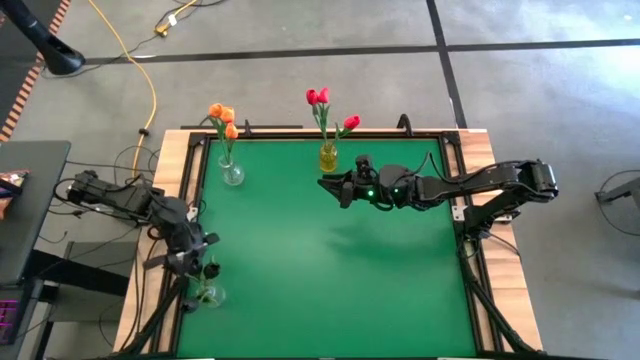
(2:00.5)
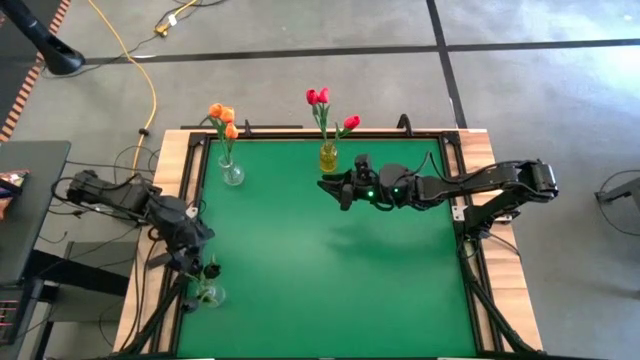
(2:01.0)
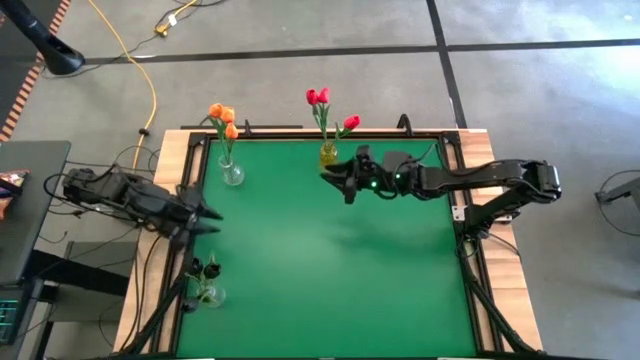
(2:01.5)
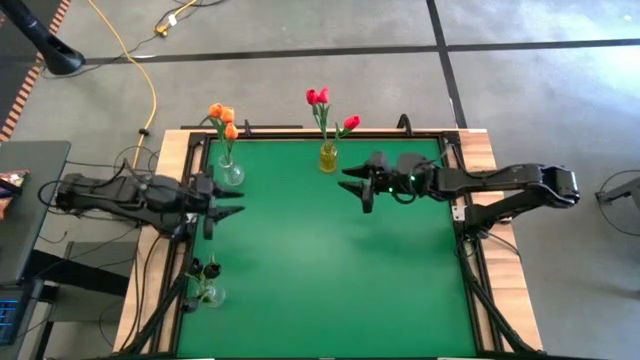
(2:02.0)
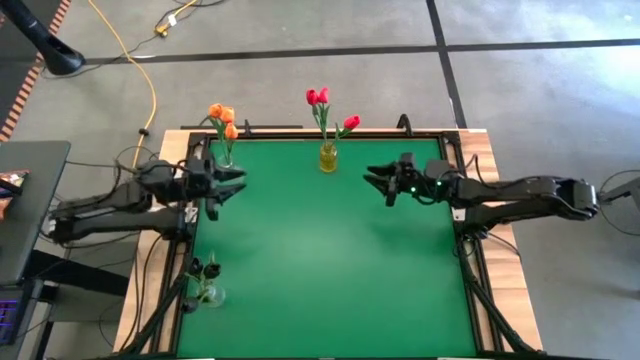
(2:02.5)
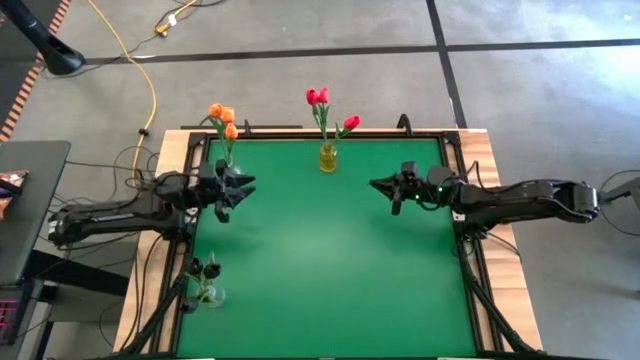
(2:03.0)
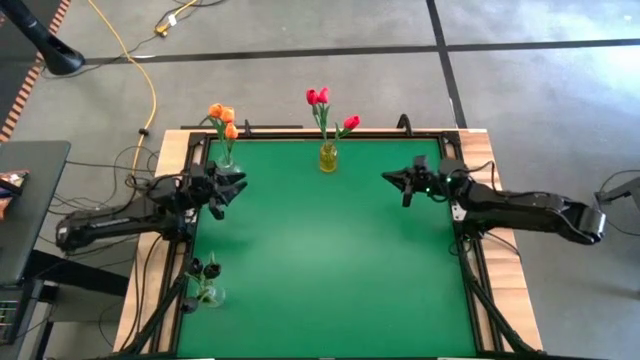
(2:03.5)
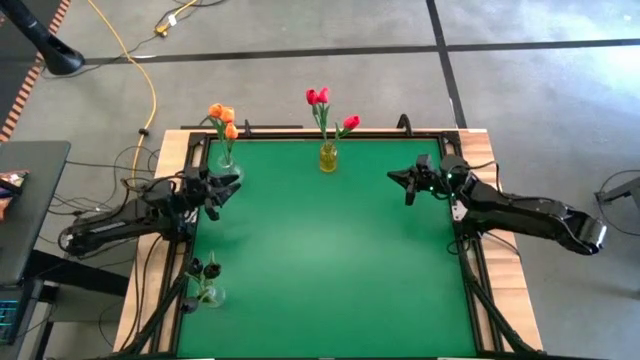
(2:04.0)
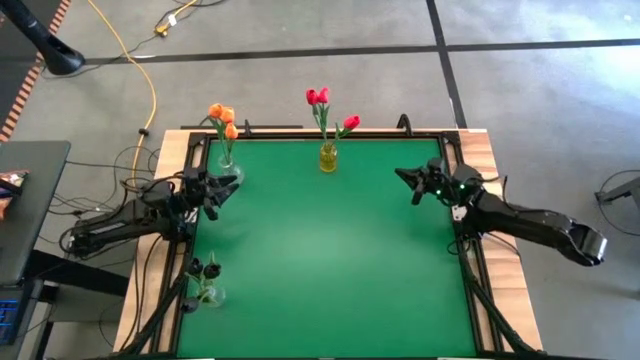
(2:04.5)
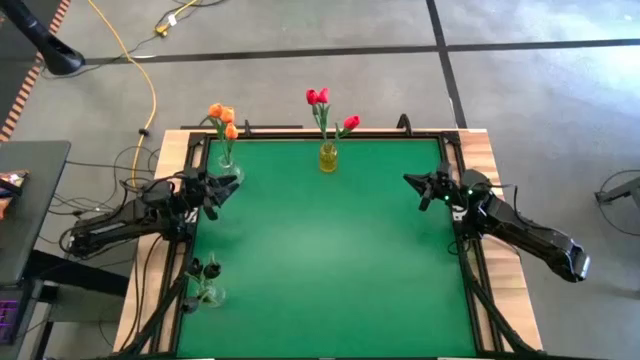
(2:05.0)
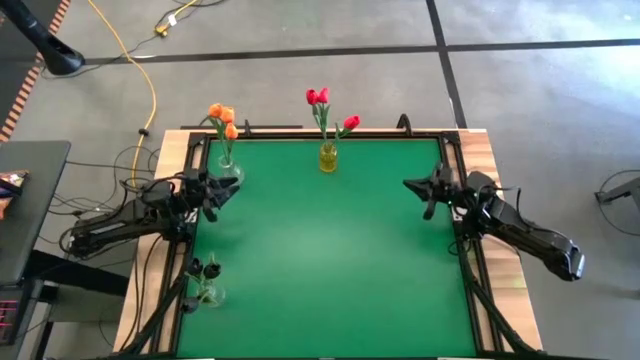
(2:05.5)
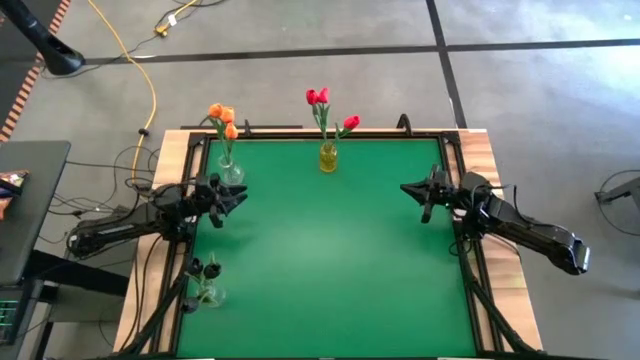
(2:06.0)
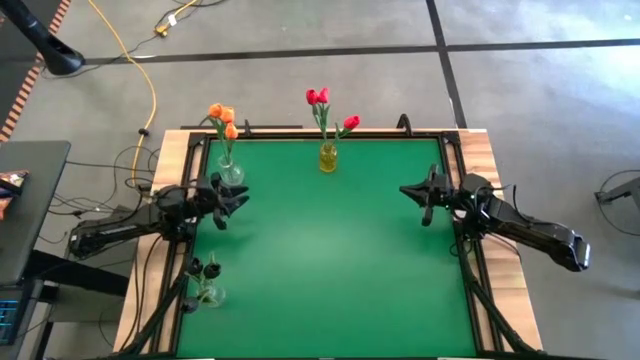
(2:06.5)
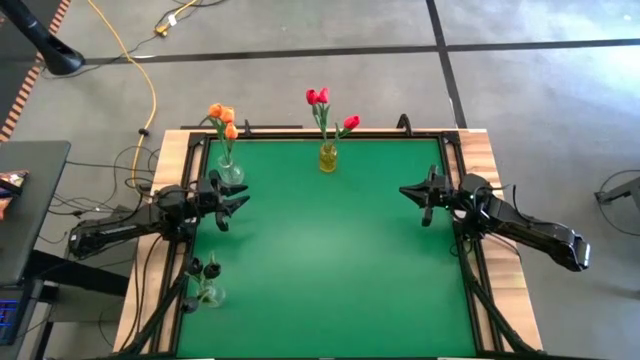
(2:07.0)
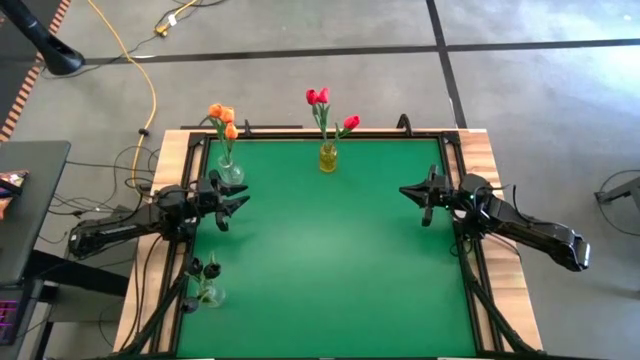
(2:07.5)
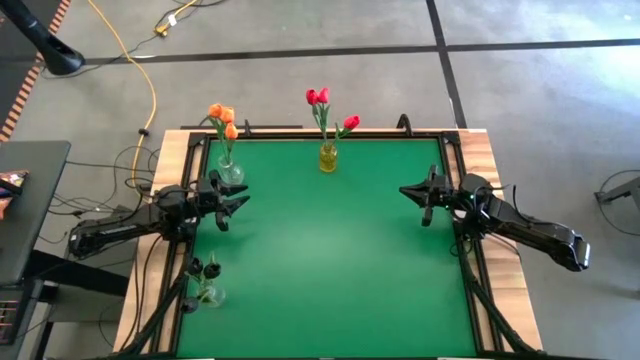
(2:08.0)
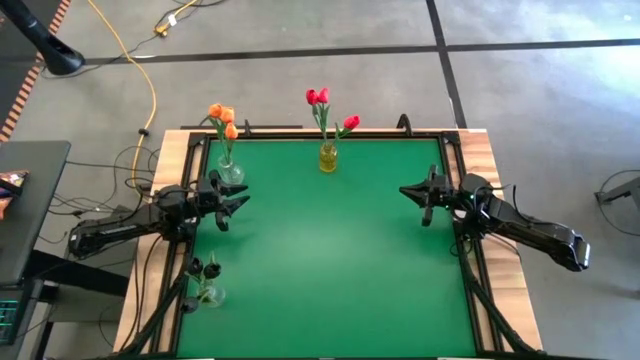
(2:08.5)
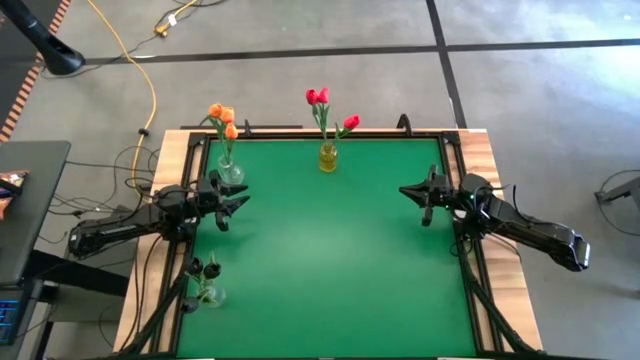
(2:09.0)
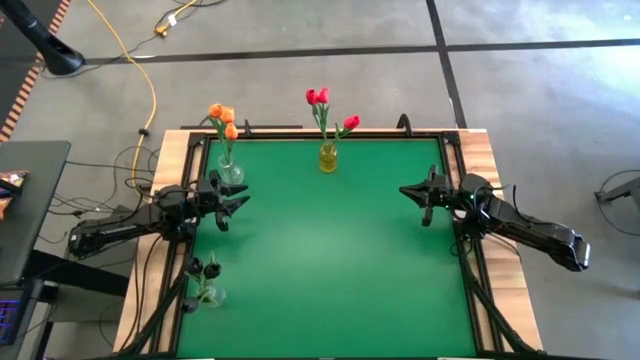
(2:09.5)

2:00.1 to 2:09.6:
Task: Sort flowers into vase by color
Return to Home Position

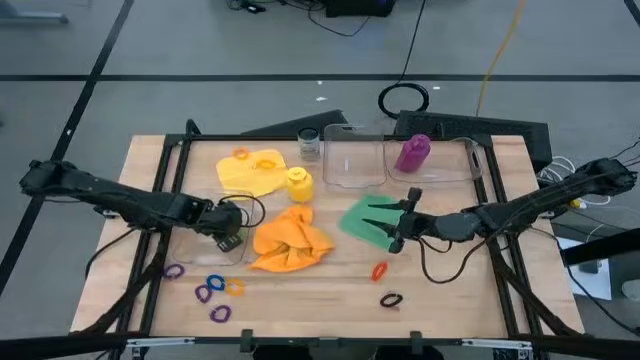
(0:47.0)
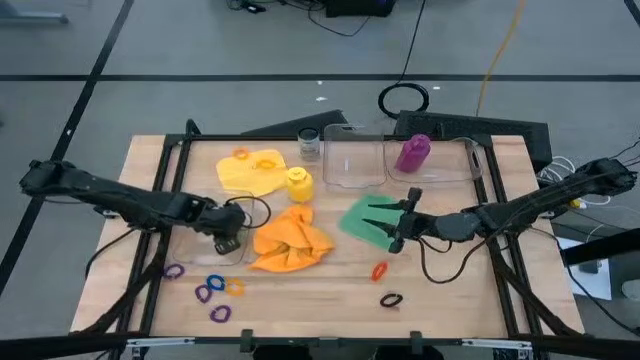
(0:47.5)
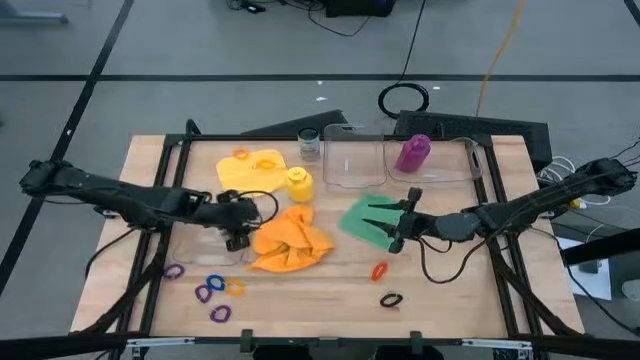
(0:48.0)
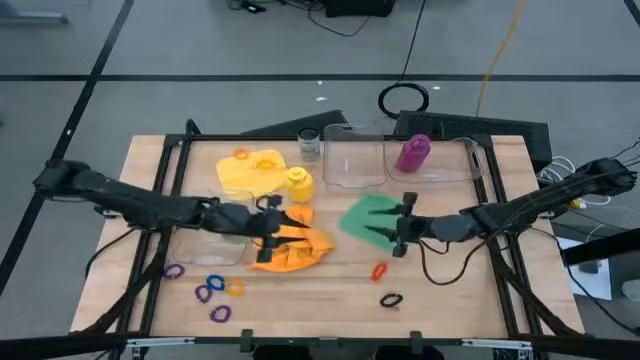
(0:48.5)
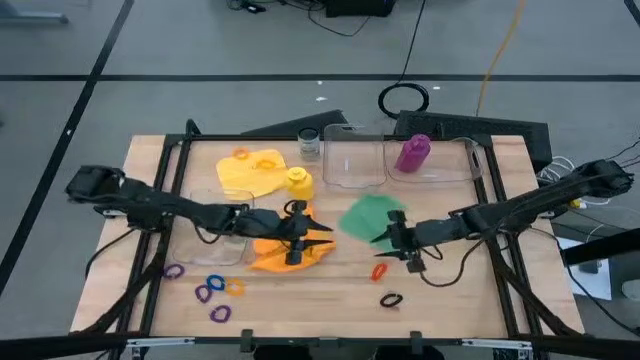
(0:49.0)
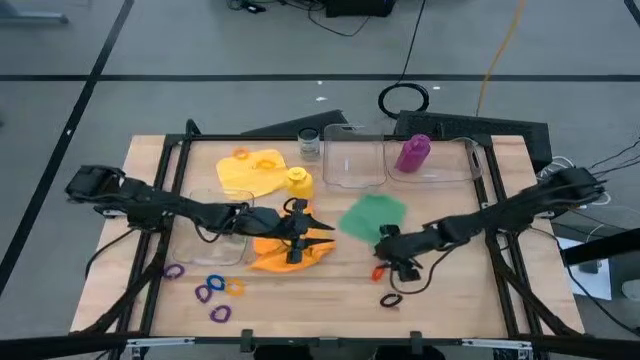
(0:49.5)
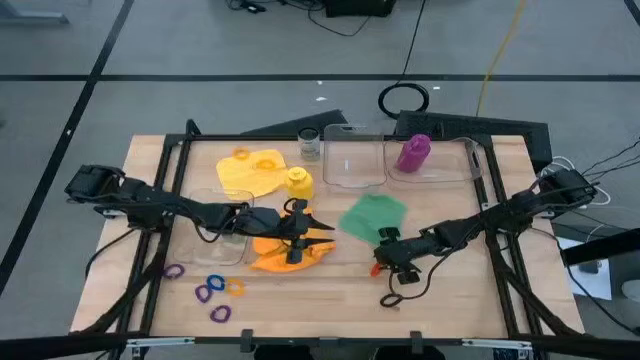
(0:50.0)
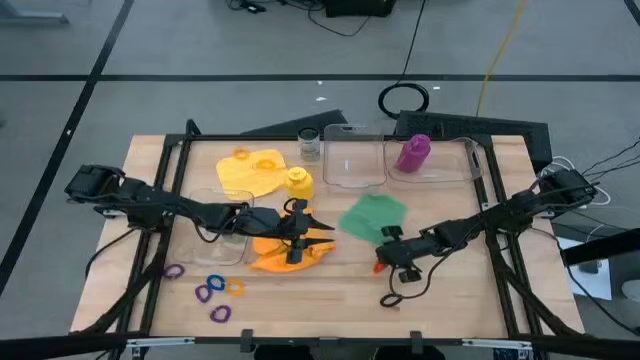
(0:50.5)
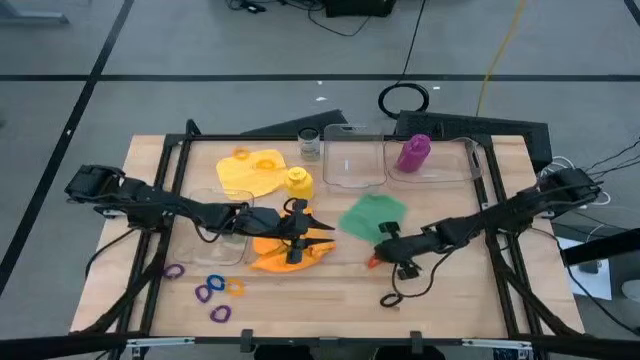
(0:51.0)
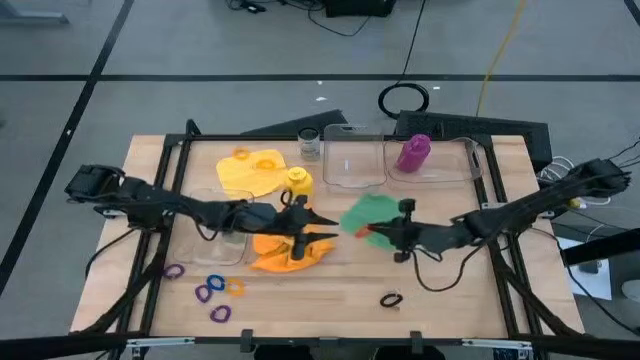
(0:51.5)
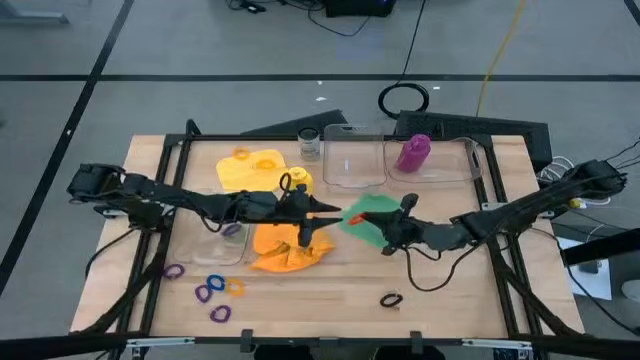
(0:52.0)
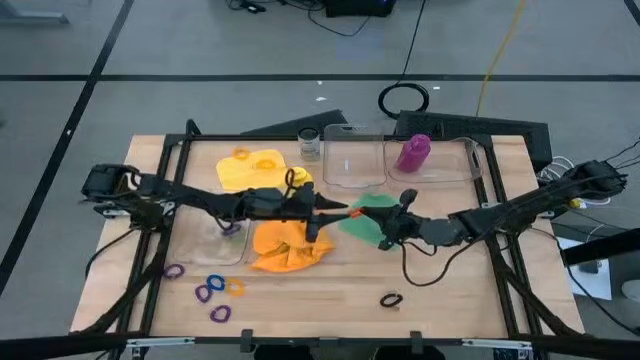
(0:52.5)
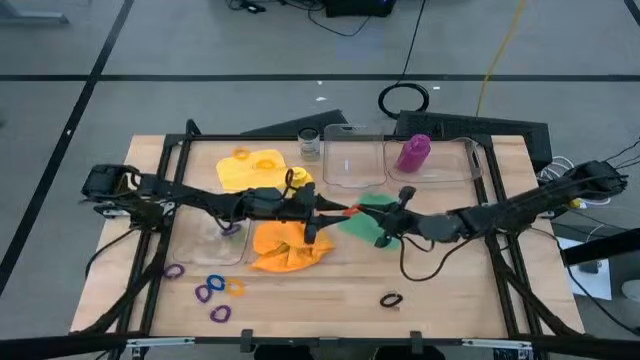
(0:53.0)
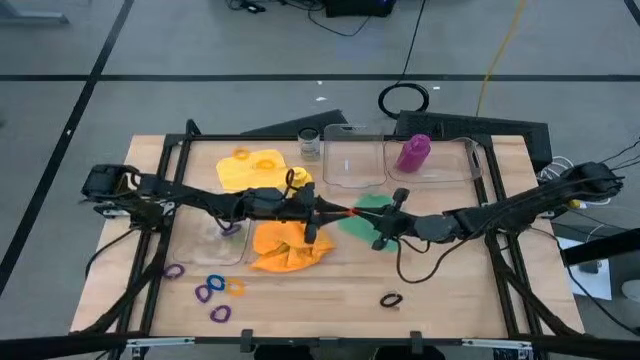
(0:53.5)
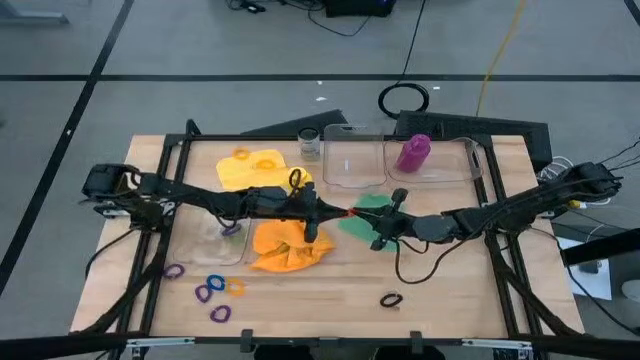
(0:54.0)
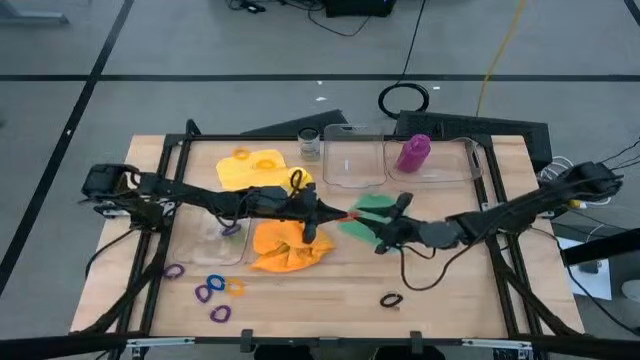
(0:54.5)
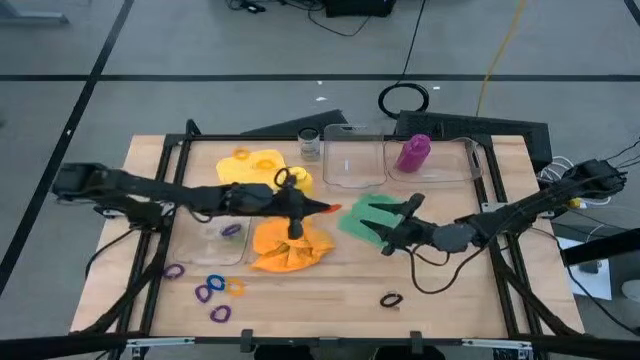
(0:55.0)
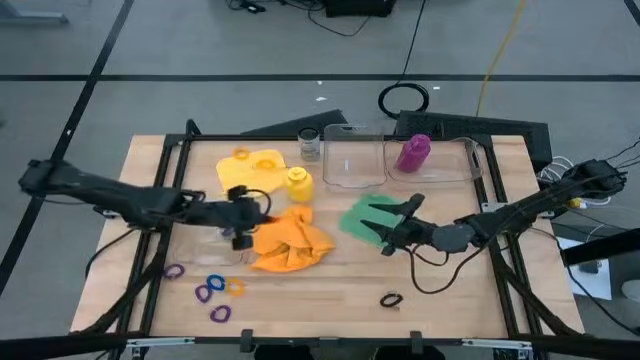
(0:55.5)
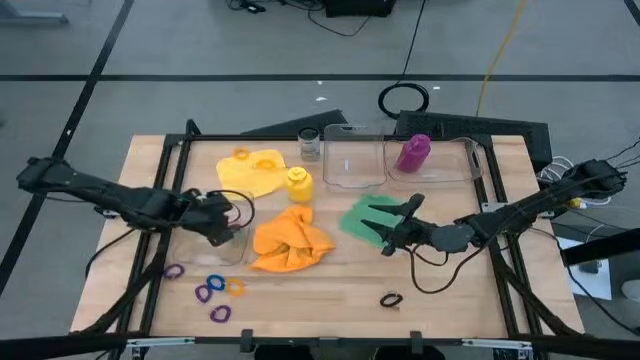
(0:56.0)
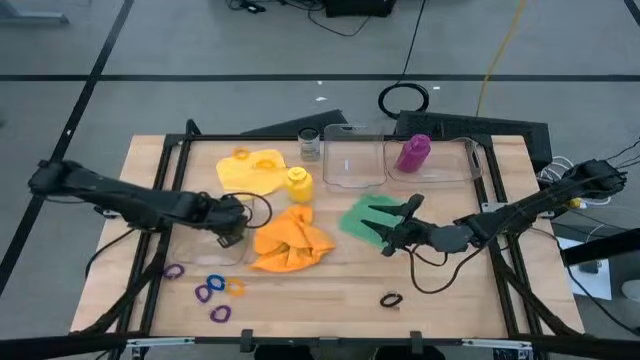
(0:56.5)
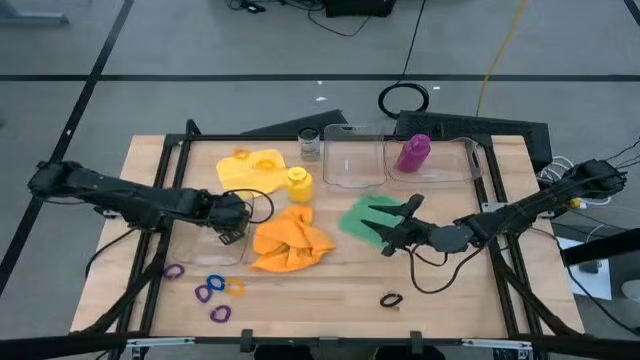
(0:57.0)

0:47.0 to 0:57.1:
Task: Pick & Place Sports Items
Put the orange spring keychain into the bottom transparent bin
